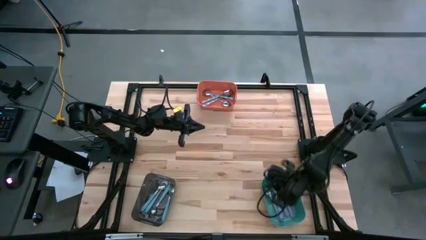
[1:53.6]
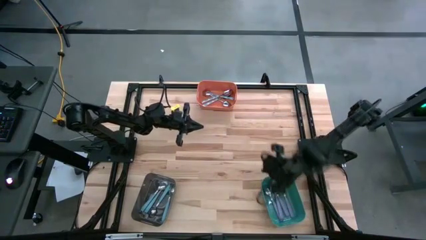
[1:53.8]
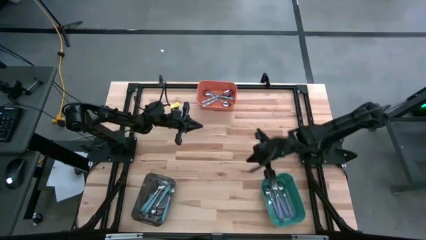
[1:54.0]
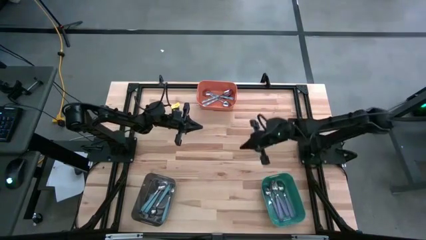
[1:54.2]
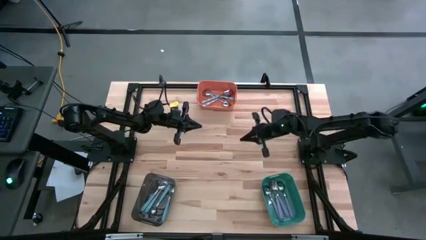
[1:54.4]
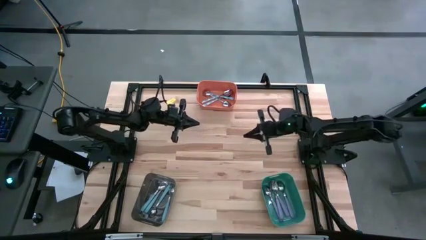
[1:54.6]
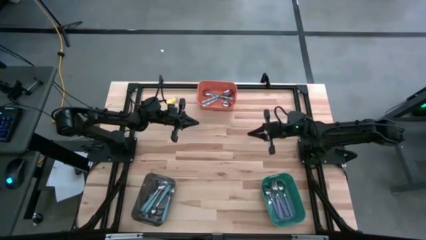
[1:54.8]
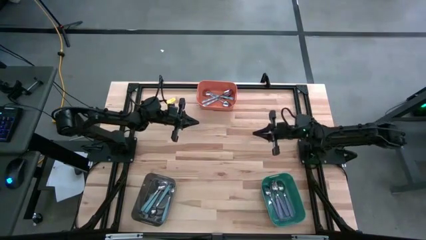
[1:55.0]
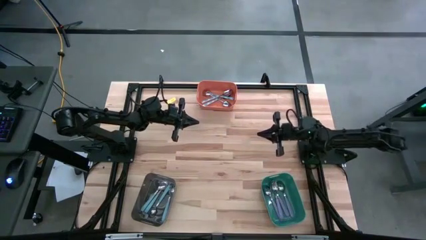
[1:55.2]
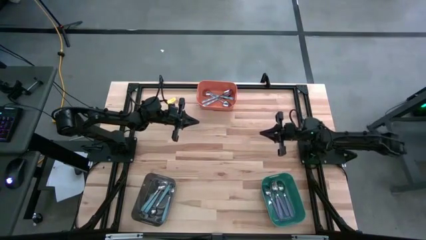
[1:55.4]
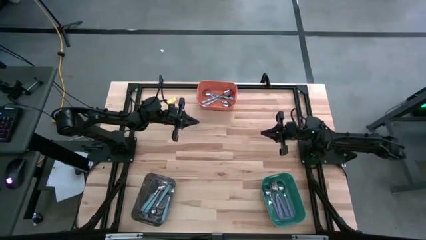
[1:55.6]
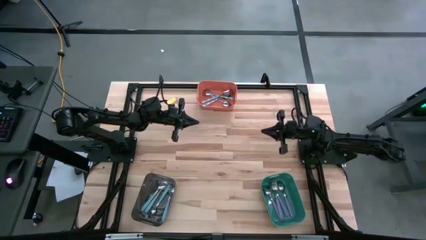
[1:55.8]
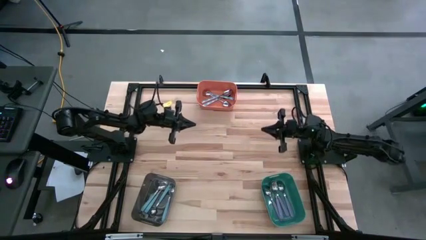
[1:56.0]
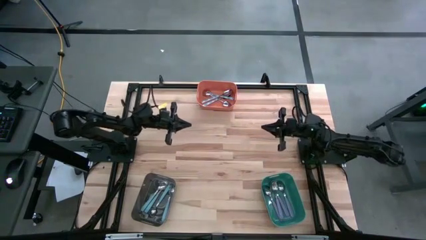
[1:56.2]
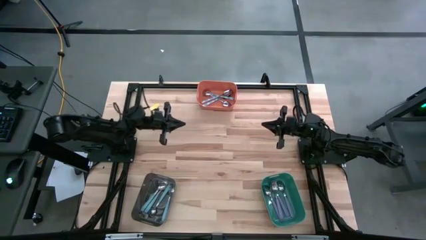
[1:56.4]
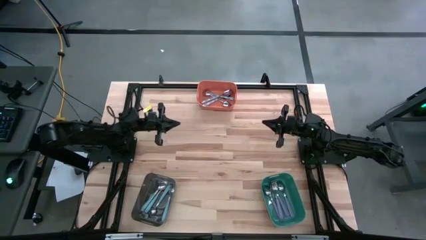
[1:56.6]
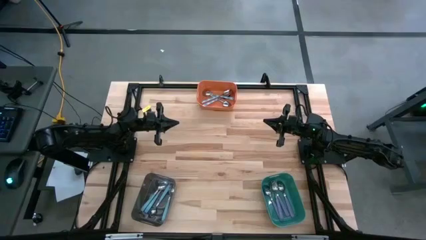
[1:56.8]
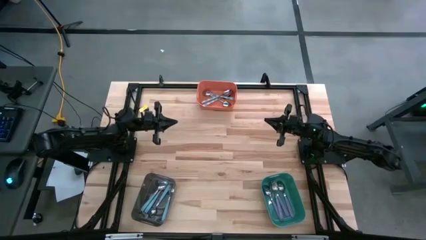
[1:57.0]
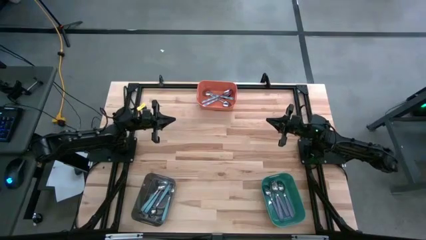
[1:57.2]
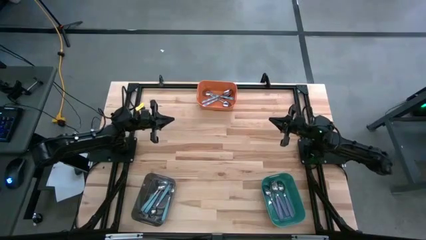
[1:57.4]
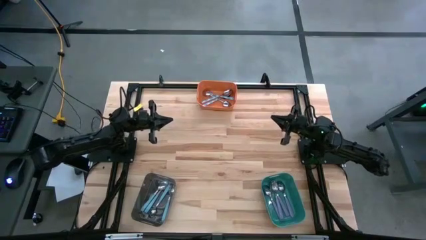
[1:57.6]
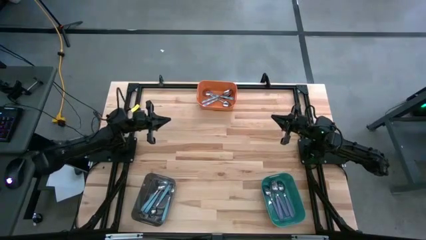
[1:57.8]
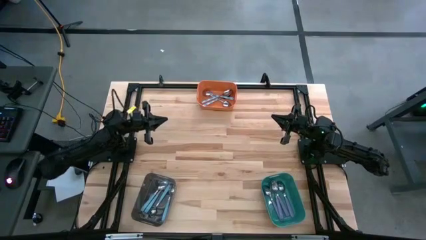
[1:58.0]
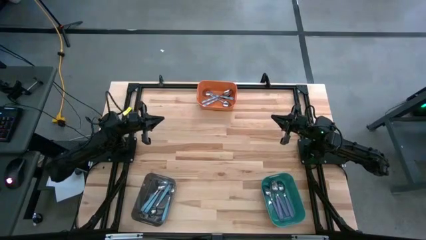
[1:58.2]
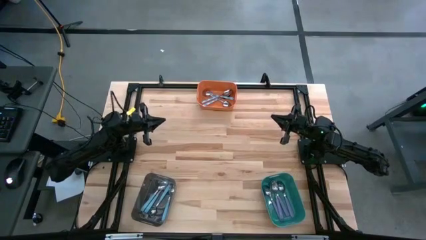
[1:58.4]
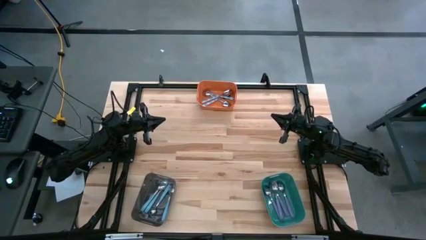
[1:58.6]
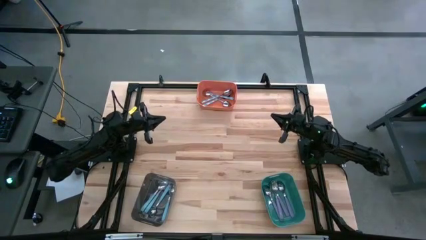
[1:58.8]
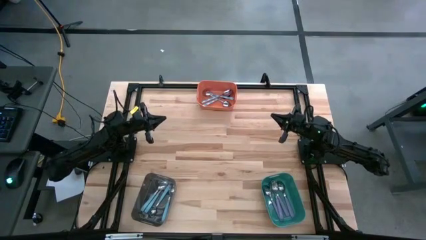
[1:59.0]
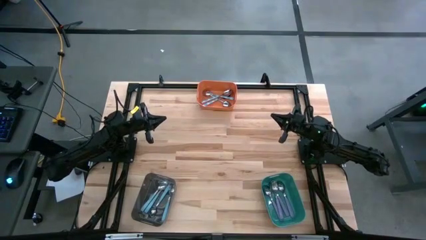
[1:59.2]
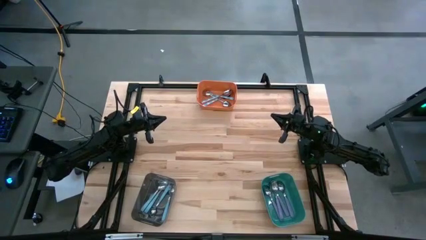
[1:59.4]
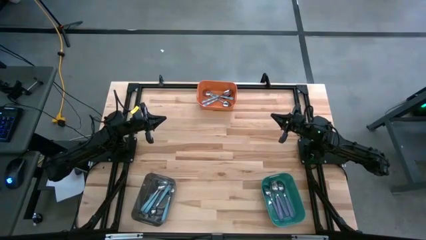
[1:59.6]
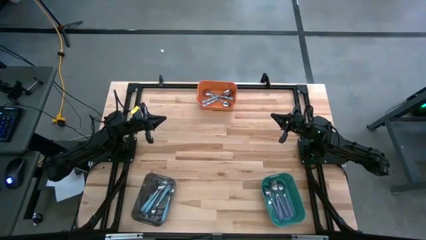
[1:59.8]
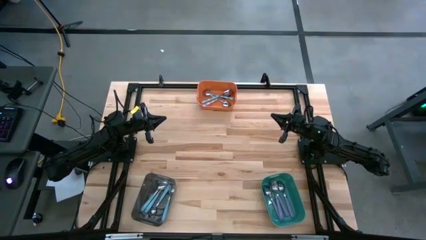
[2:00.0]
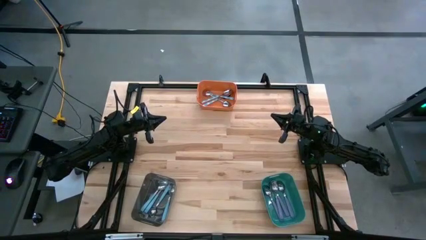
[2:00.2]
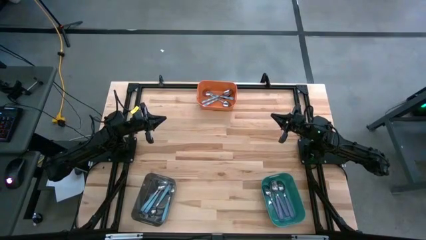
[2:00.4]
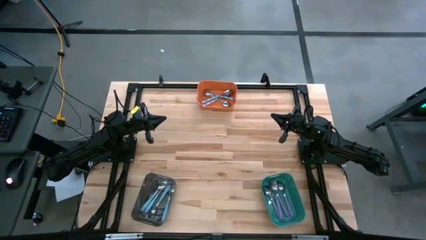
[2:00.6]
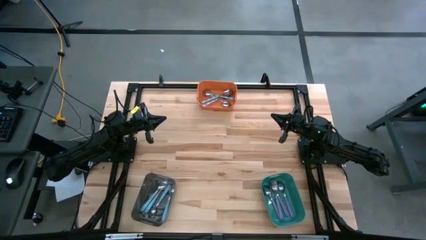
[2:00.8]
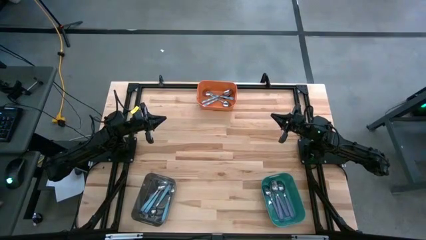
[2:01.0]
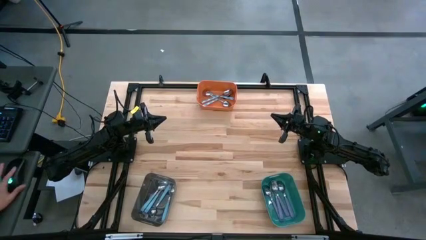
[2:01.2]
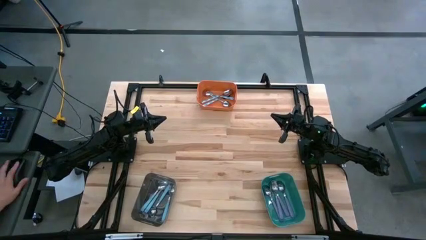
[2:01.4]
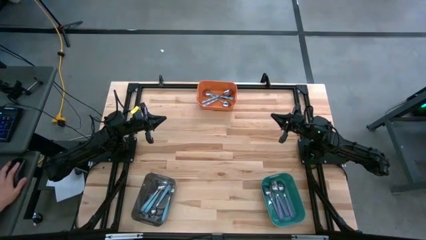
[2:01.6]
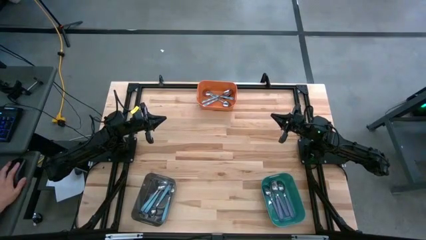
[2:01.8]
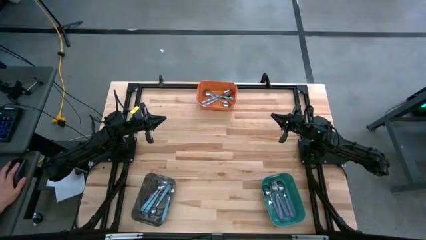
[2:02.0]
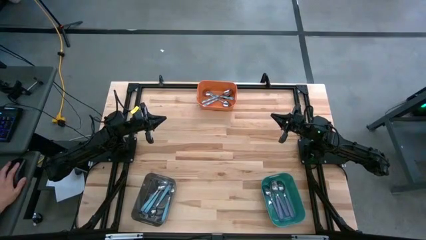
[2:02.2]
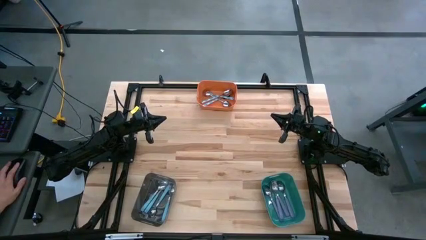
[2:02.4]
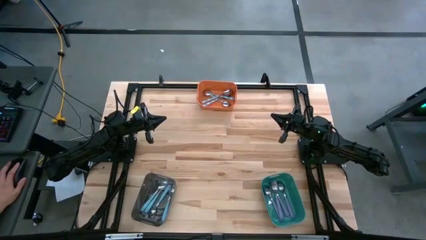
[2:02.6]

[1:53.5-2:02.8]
Task: Sort silverware by color (type)
Return to Home Position

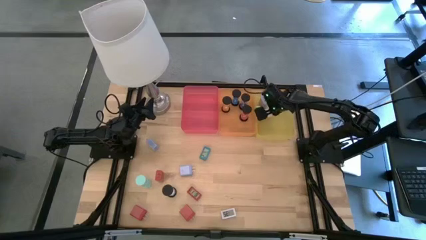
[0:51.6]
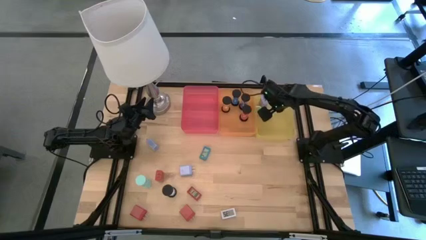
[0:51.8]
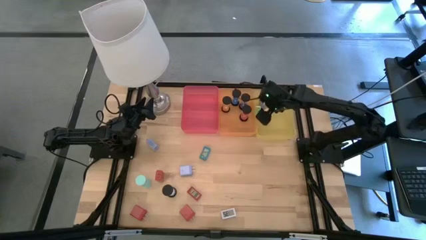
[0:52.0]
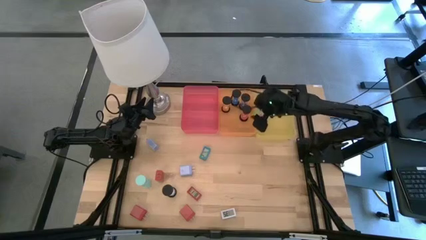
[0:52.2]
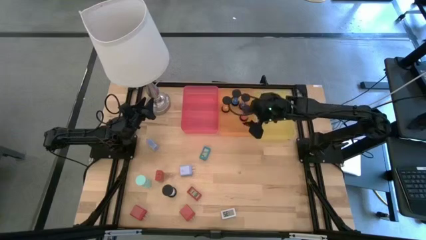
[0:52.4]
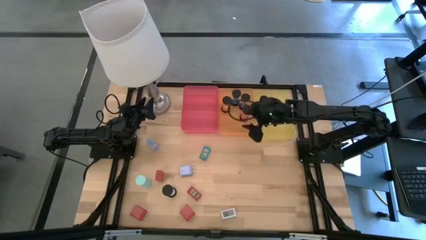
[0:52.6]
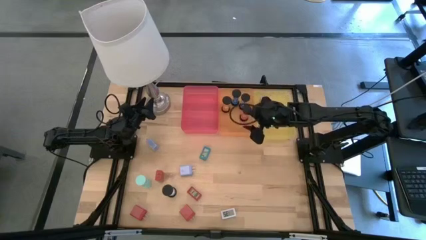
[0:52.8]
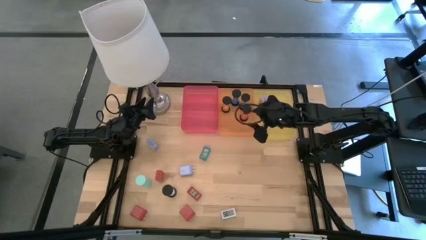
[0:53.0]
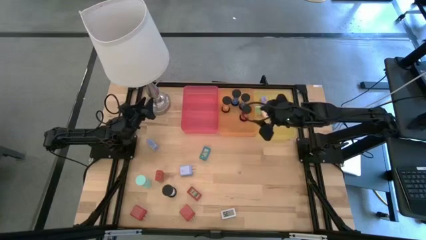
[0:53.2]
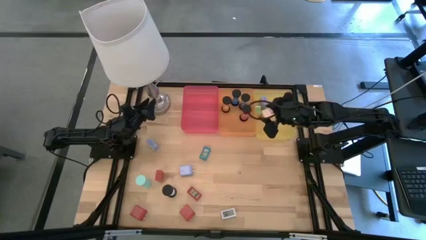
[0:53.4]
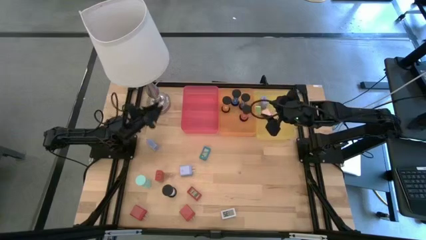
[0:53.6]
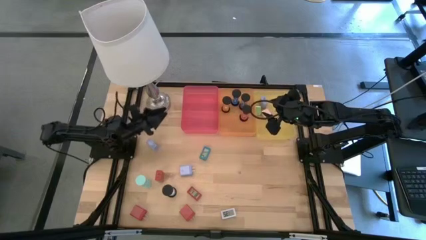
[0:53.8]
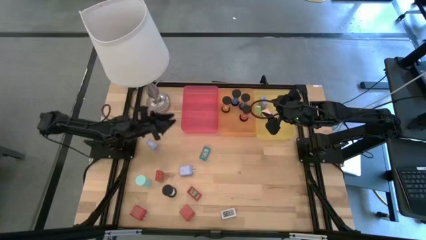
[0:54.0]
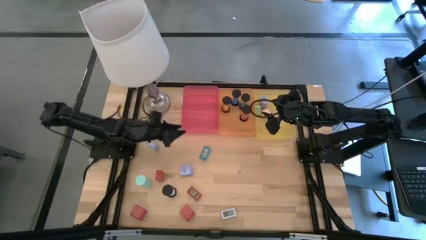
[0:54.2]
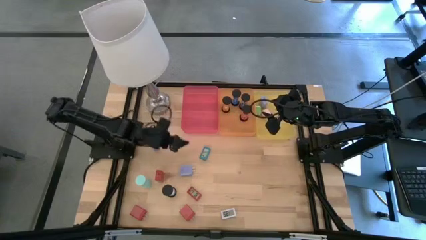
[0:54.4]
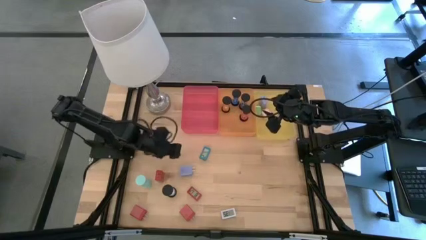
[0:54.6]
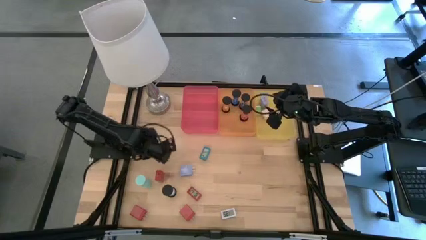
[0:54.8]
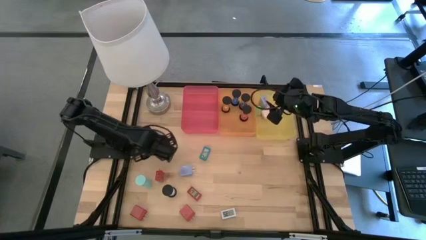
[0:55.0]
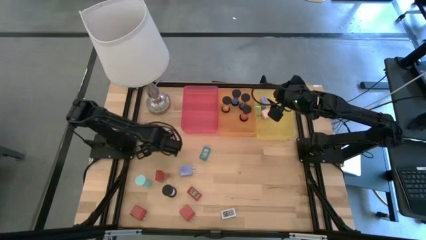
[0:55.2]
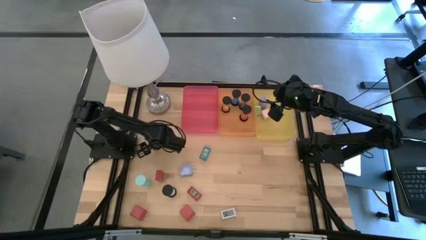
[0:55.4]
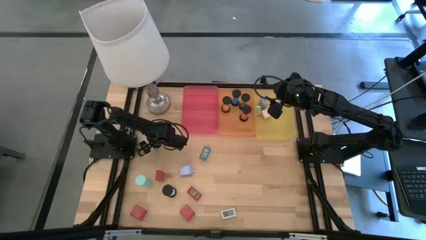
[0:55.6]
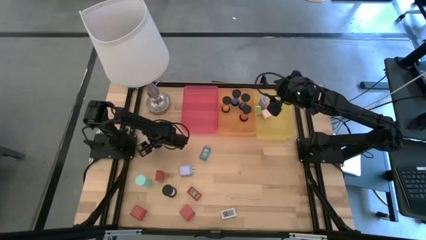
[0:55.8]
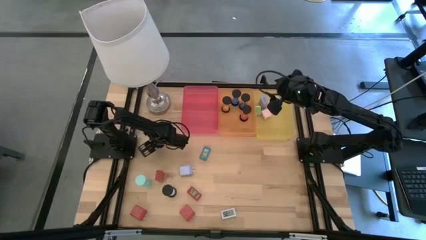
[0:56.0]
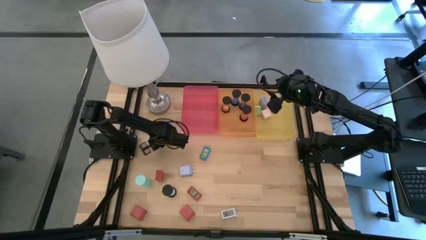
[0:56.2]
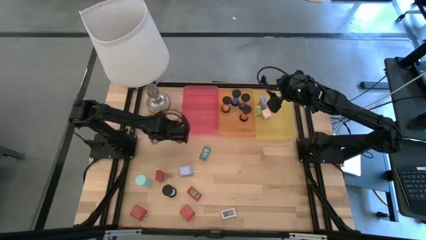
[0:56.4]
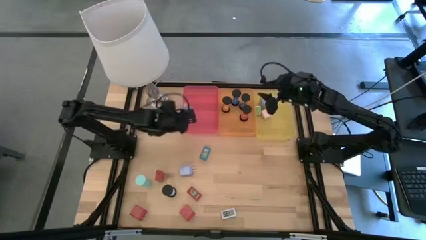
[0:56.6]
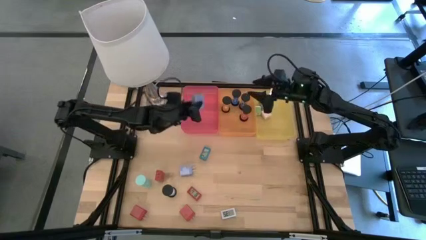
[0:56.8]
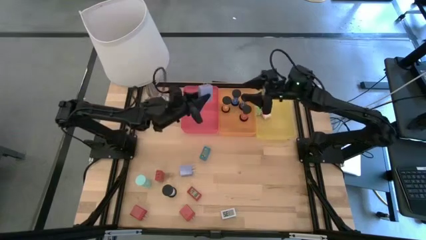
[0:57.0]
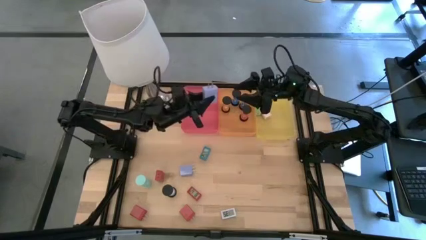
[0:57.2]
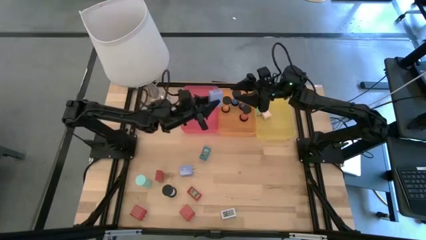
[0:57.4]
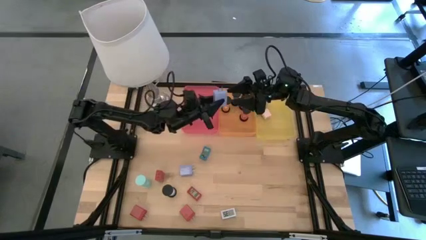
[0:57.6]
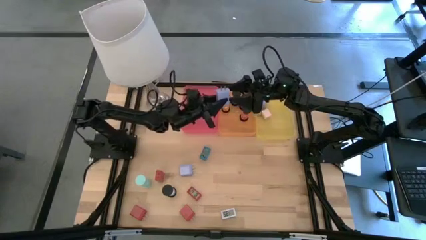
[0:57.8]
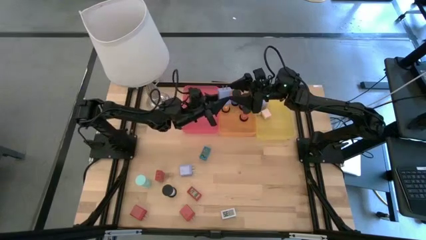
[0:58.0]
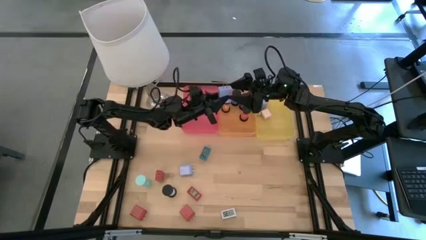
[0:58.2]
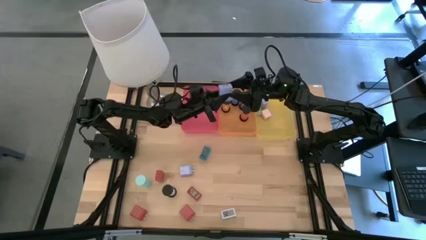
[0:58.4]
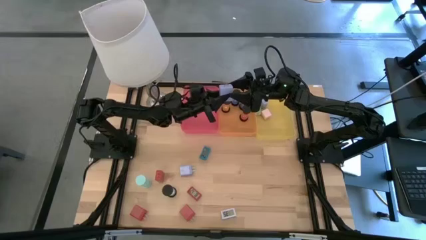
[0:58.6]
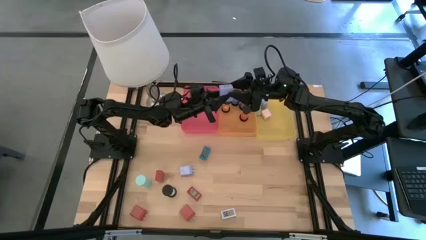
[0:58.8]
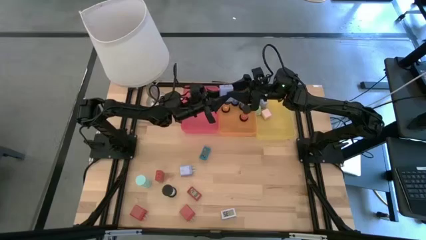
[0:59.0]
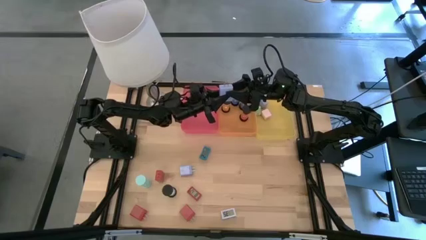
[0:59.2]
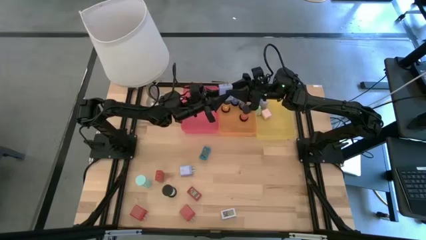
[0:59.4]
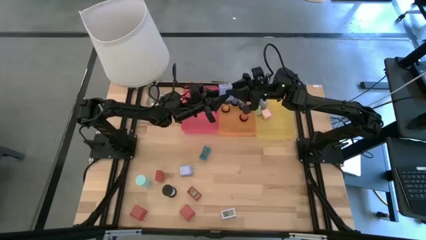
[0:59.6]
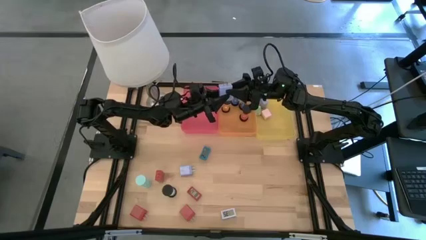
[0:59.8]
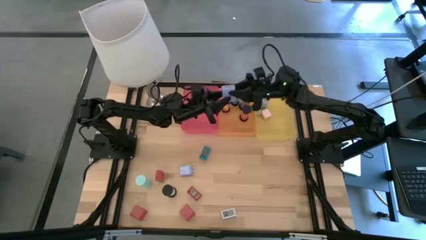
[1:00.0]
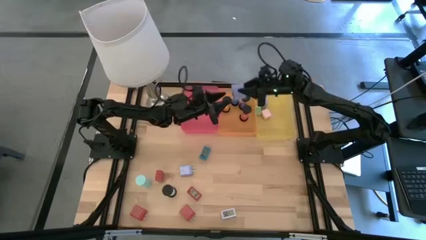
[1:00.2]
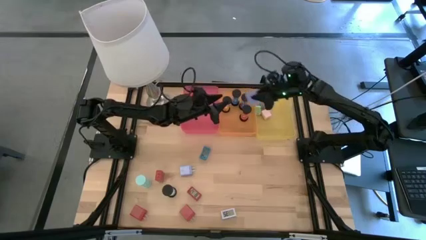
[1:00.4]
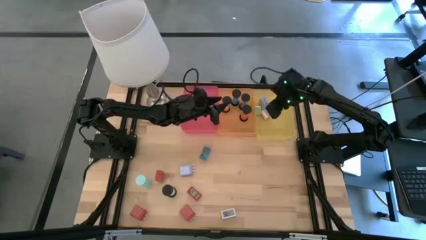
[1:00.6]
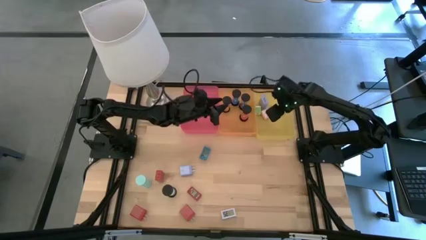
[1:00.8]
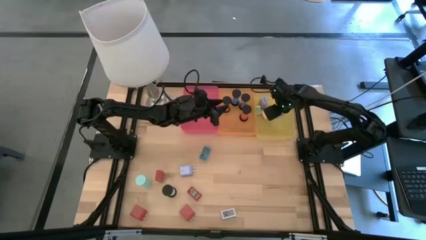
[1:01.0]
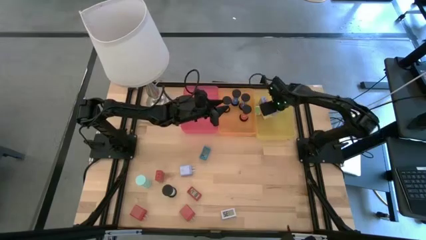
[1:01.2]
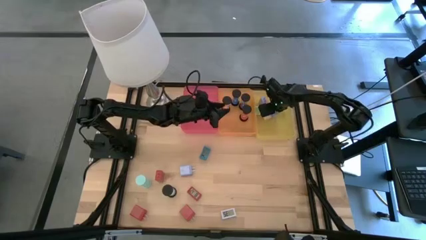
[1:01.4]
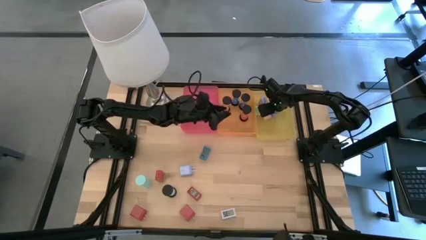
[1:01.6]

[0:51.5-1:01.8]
Task: Pick & Place Office items
Put the top blue charger adapter into the yellow bin
